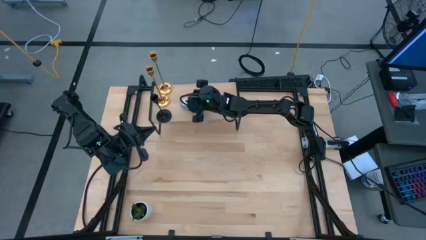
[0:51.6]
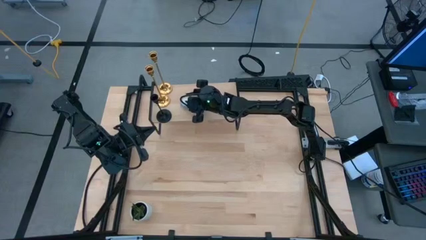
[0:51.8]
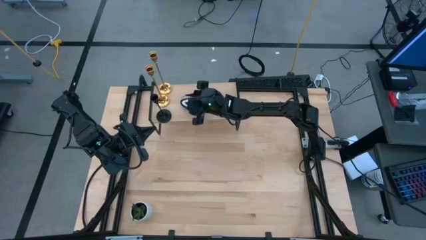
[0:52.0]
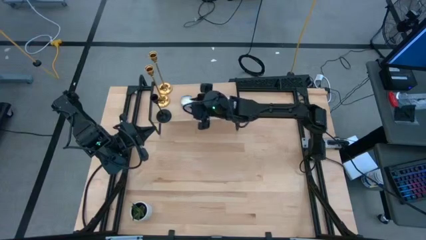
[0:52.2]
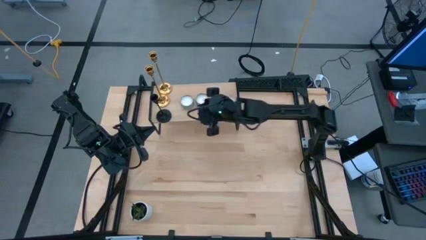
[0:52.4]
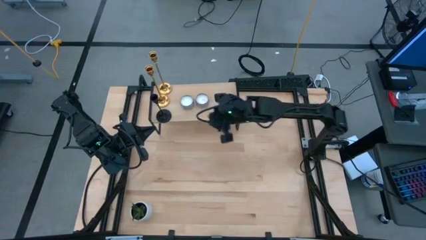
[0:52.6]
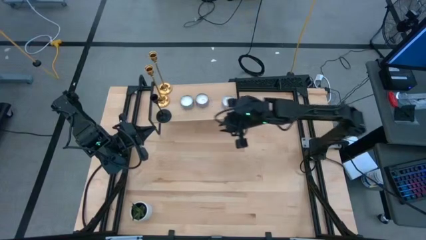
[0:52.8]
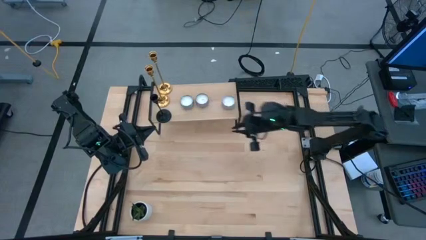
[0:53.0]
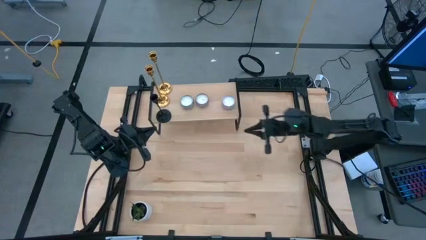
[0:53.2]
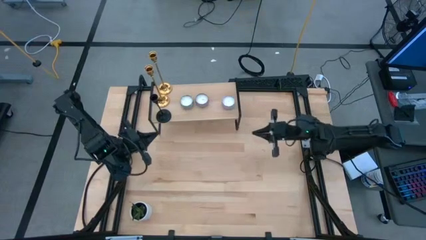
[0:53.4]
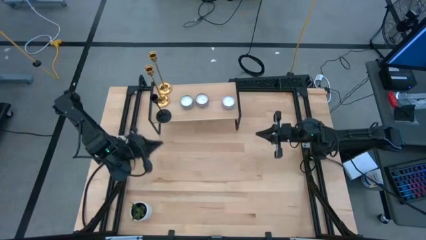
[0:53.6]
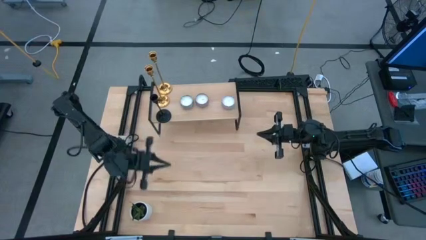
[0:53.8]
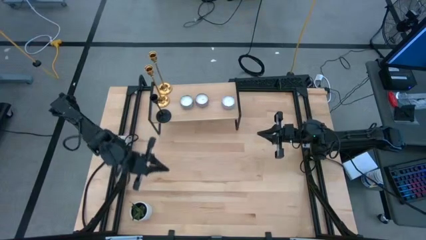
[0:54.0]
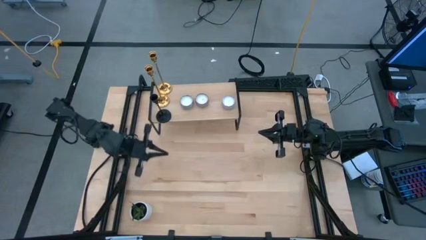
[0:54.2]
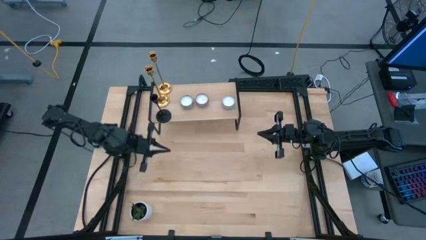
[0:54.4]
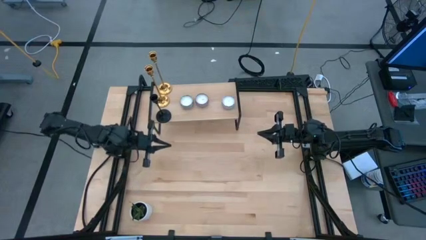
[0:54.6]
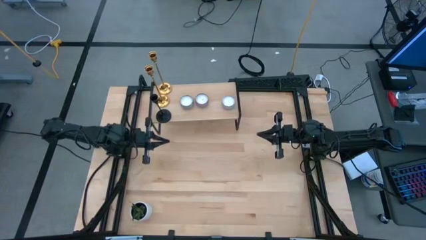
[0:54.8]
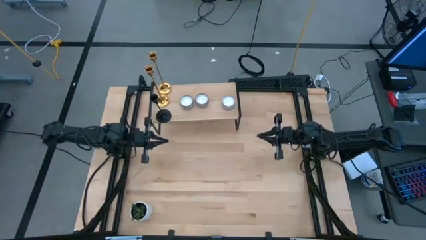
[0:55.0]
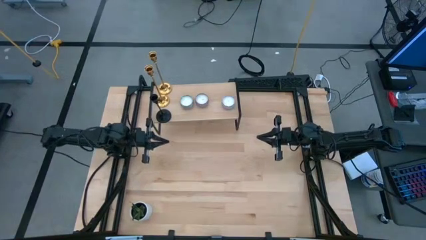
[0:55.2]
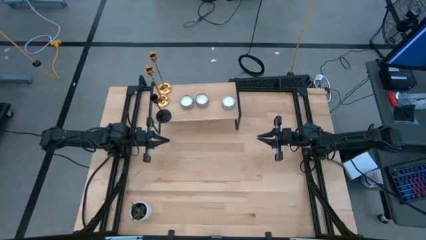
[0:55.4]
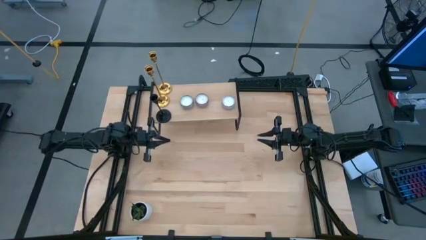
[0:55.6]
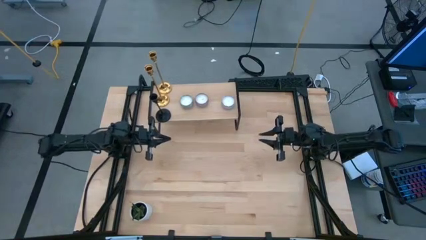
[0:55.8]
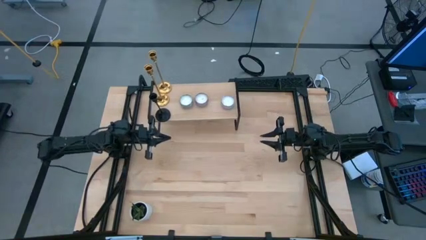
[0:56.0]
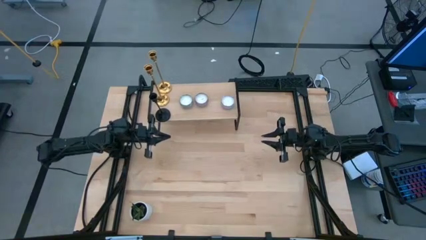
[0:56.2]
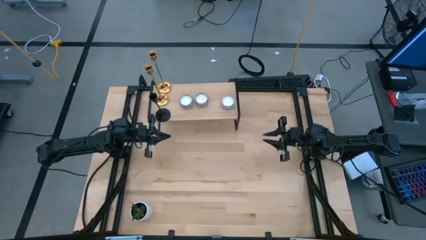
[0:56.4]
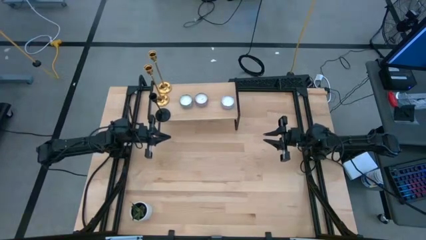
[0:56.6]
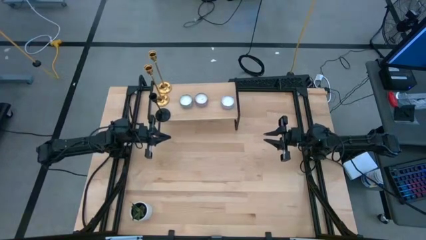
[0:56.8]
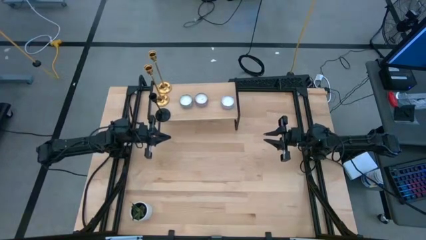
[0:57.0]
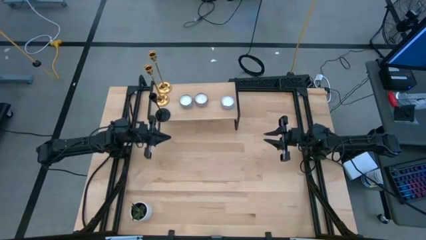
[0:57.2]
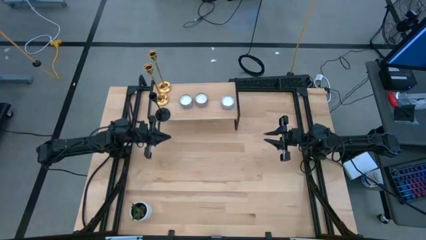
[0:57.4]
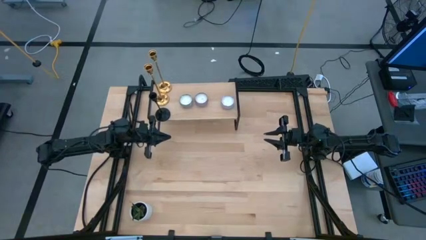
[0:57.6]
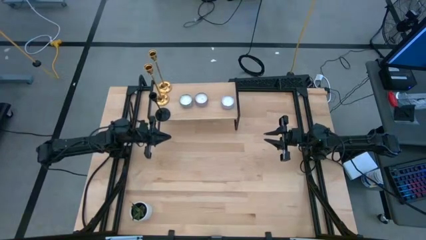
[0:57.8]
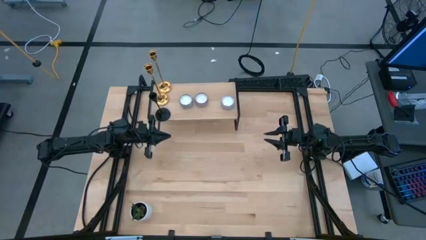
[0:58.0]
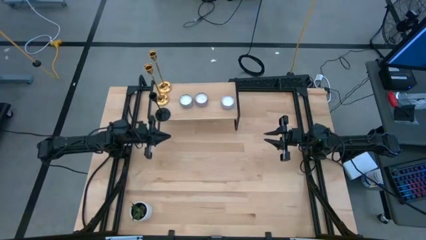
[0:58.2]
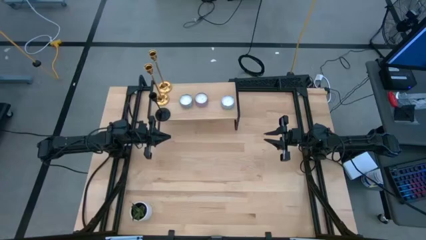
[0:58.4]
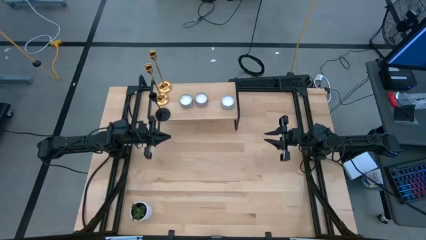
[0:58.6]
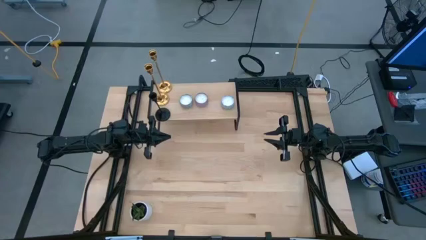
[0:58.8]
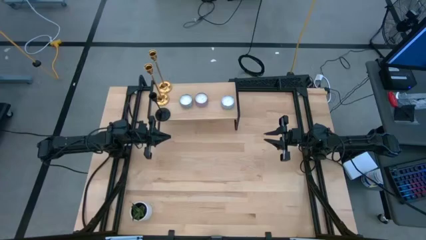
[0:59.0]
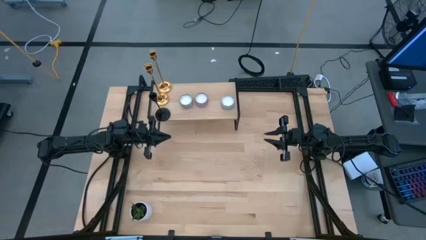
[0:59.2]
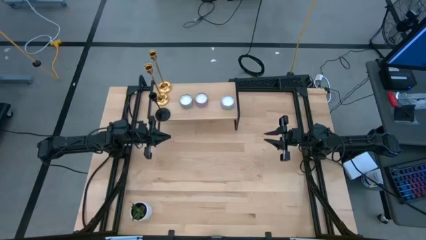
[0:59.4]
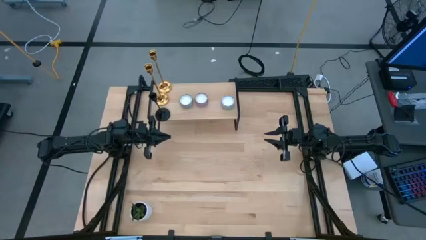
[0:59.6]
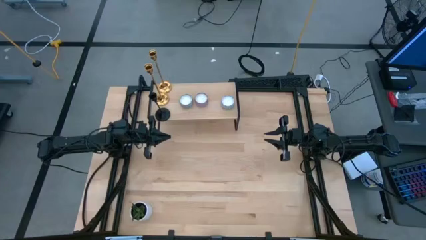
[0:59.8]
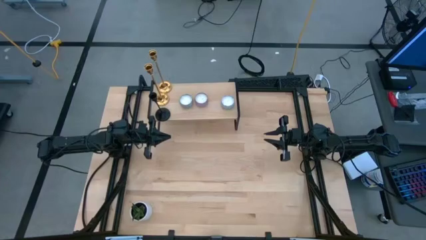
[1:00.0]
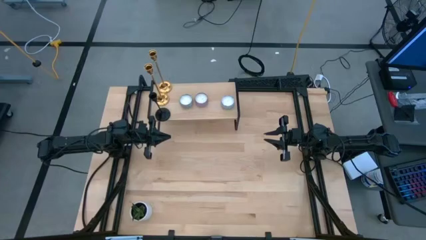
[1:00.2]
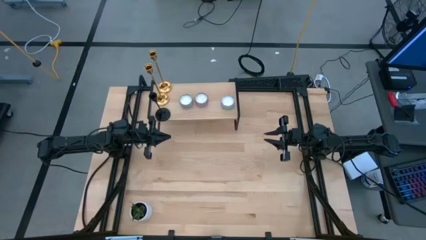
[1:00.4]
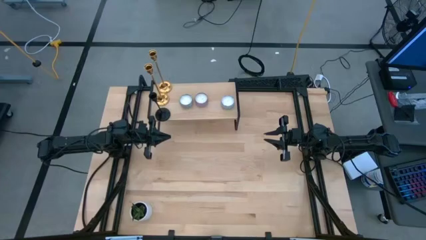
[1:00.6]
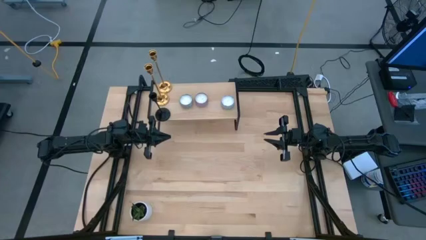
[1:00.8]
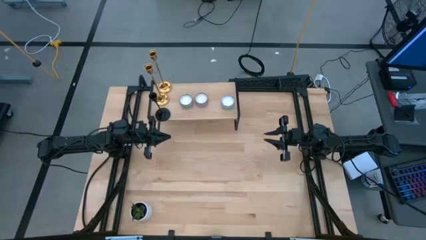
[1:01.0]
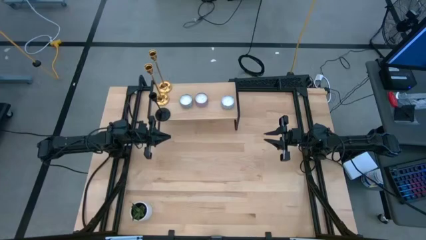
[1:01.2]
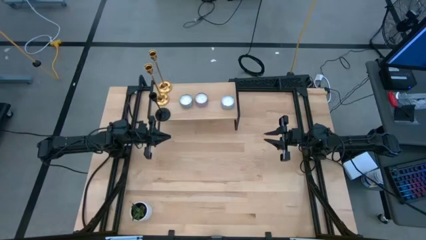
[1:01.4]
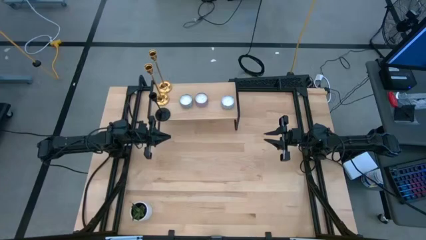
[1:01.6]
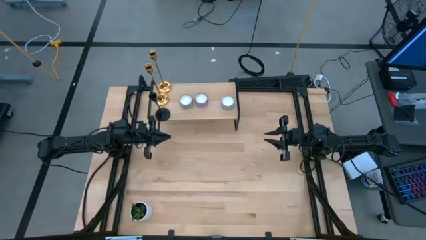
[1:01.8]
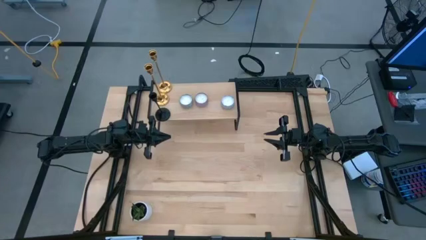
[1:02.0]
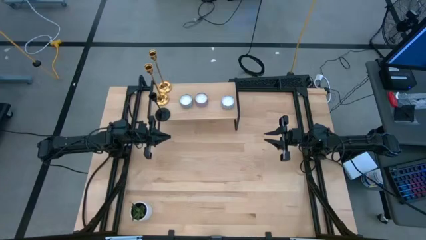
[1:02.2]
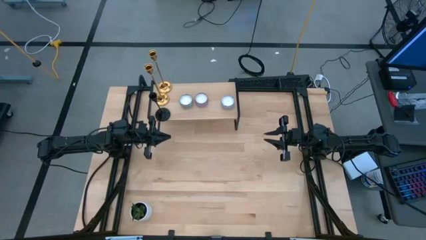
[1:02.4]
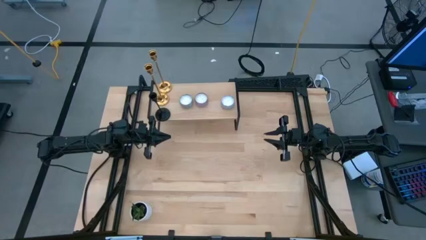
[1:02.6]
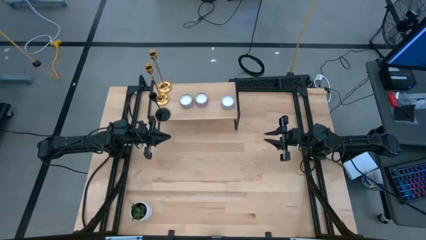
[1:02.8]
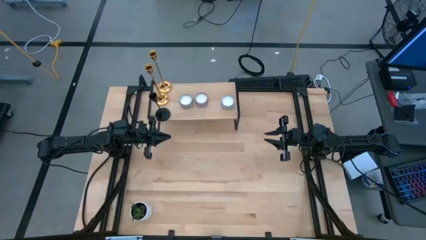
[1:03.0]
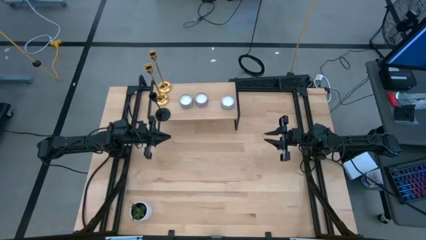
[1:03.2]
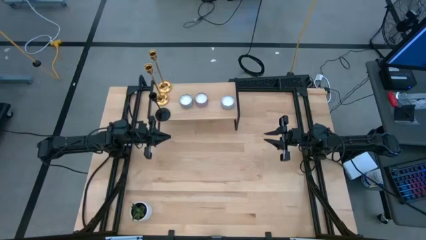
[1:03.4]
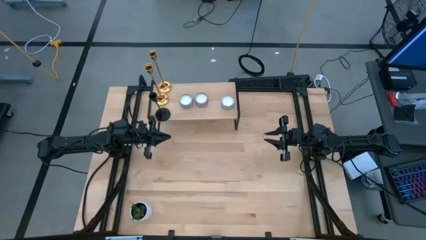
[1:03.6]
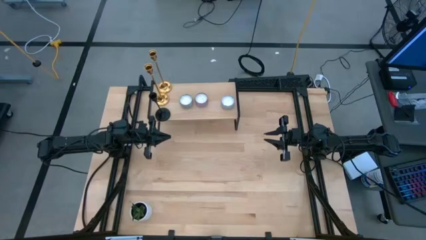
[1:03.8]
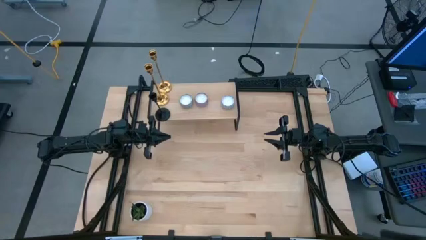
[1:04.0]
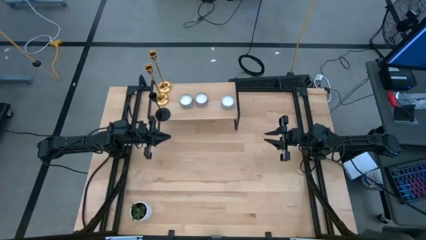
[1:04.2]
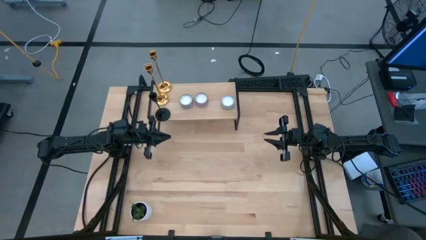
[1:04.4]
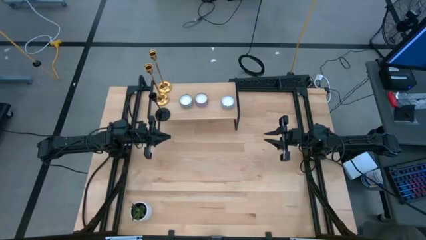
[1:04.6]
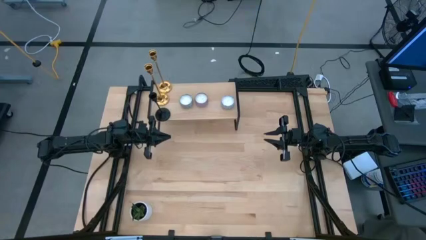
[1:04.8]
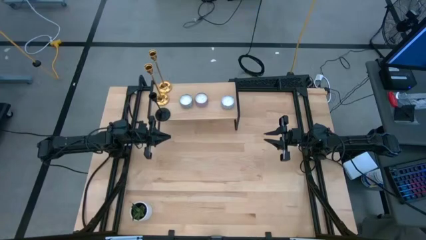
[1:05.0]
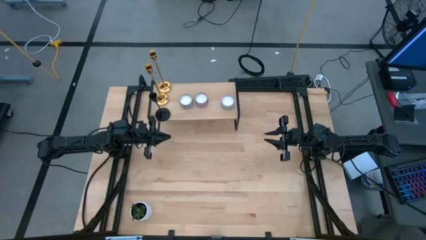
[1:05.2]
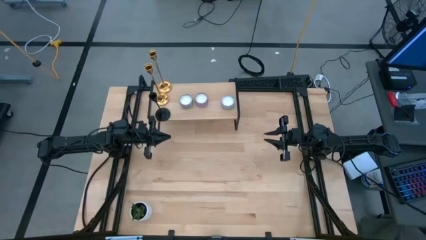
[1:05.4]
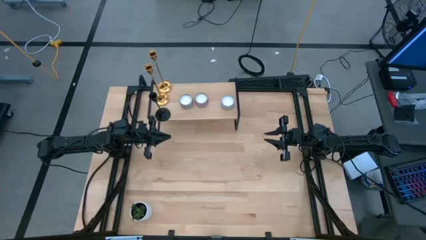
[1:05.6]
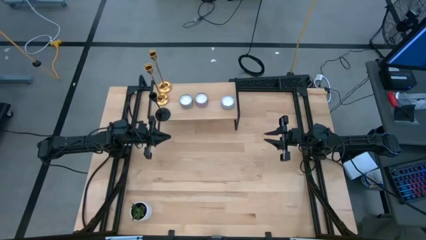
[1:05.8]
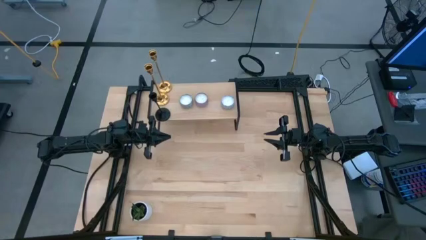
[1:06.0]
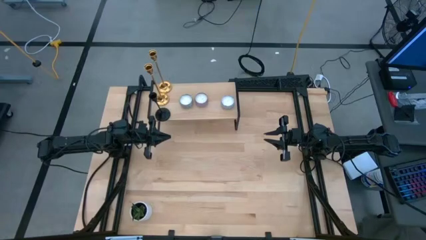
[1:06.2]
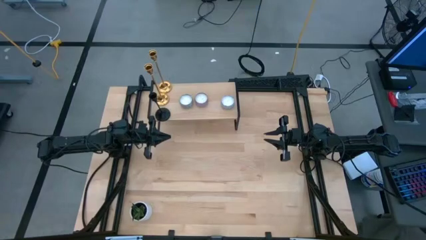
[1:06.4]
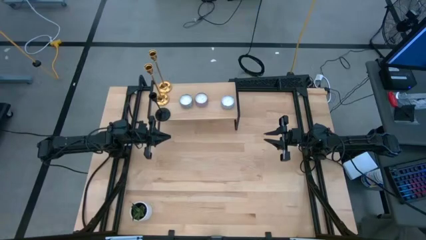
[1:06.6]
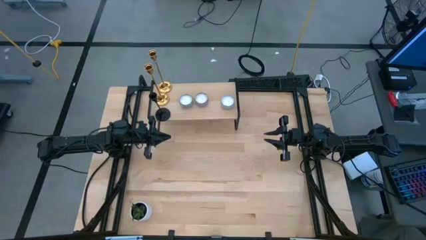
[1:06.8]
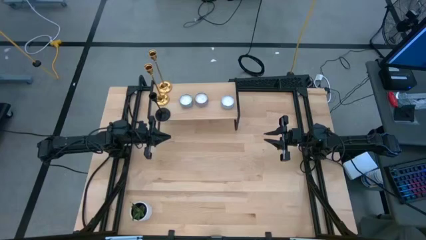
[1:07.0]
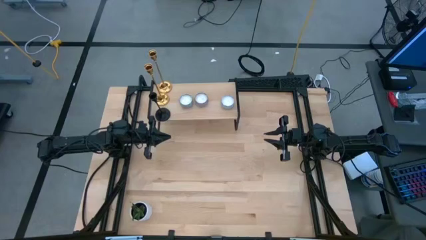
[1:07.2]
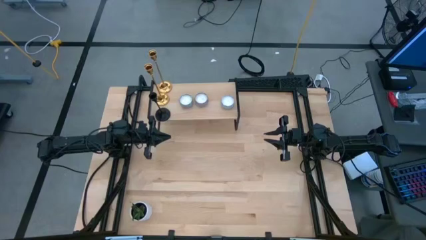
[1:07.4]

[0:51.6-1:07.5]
Task: Pick & Place candle stick holders
Return to Home Position
